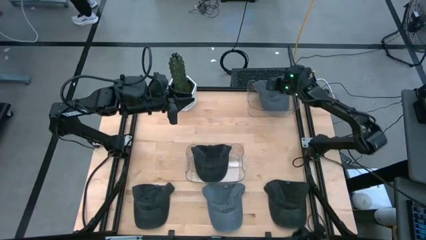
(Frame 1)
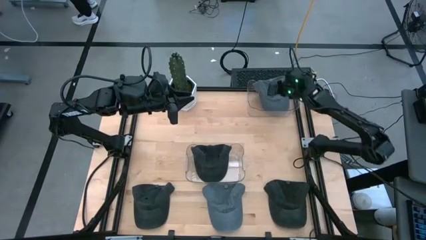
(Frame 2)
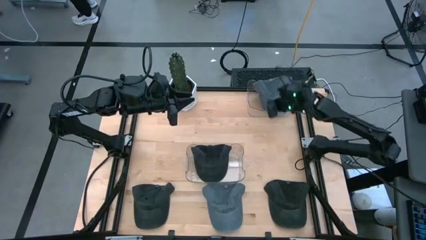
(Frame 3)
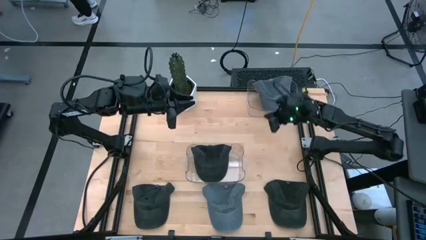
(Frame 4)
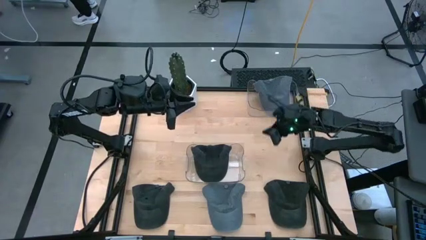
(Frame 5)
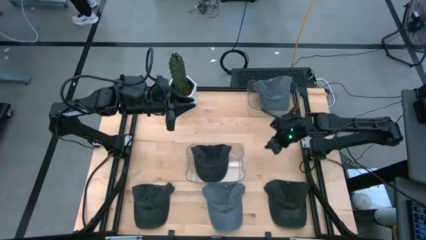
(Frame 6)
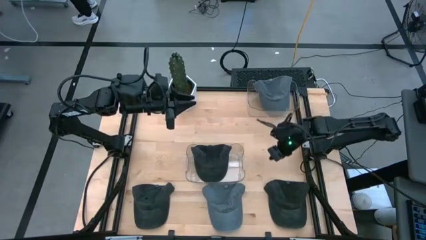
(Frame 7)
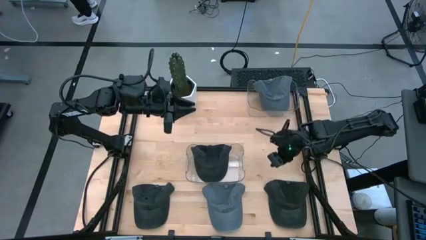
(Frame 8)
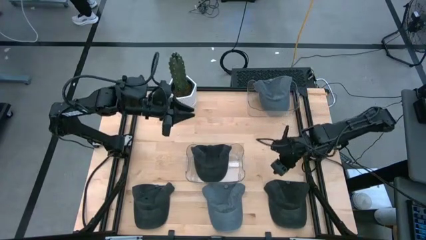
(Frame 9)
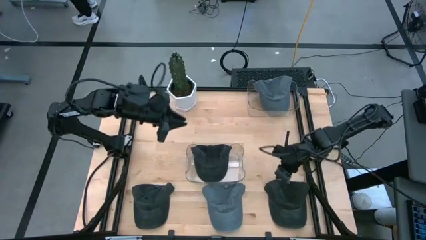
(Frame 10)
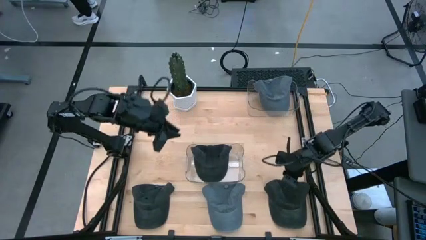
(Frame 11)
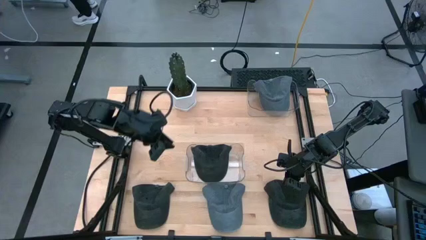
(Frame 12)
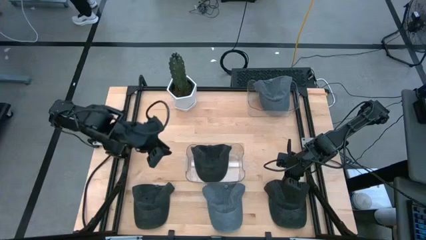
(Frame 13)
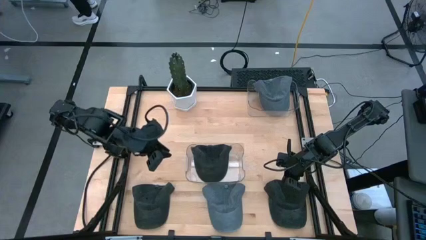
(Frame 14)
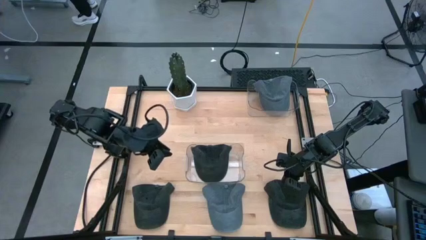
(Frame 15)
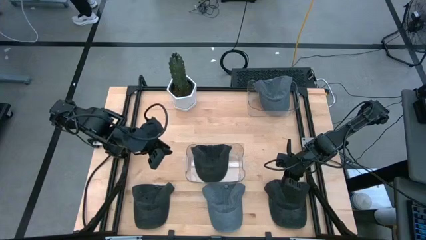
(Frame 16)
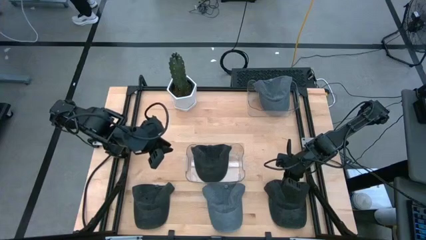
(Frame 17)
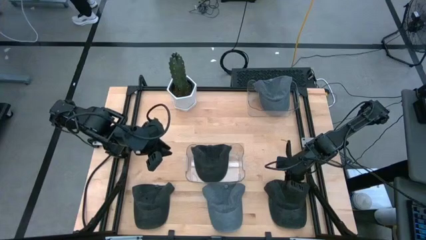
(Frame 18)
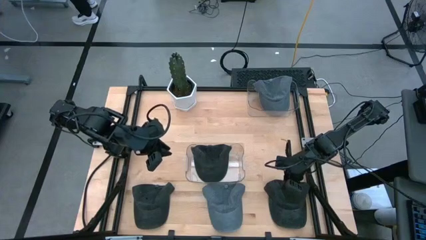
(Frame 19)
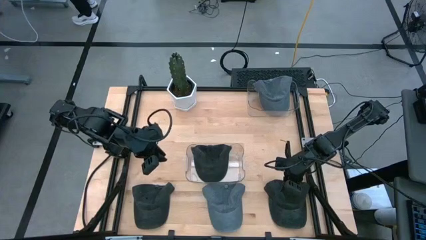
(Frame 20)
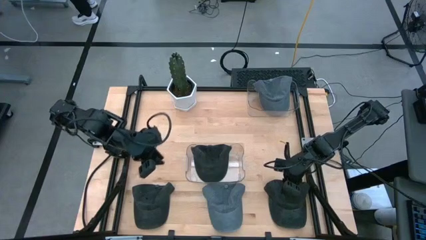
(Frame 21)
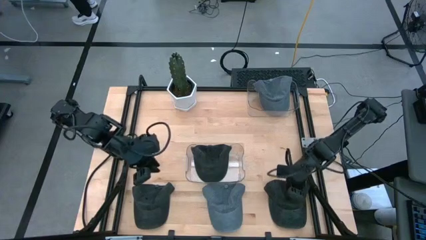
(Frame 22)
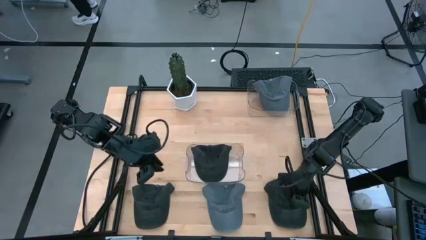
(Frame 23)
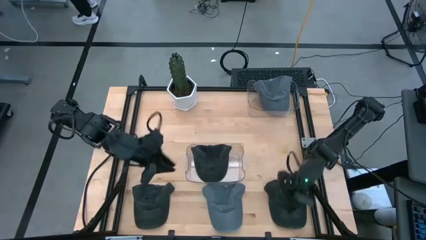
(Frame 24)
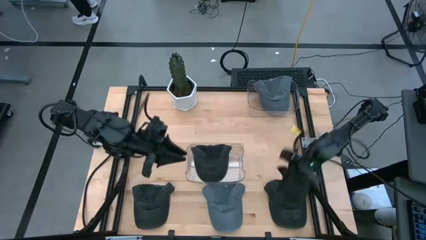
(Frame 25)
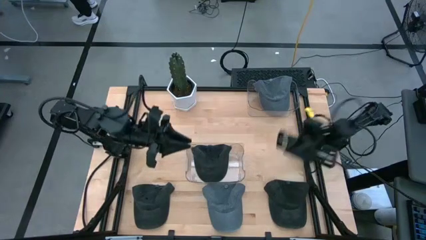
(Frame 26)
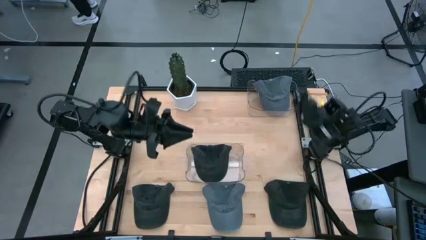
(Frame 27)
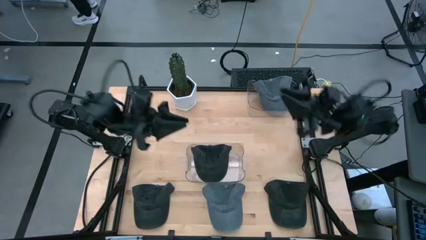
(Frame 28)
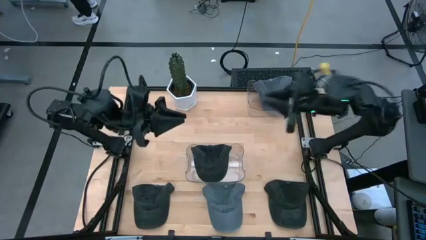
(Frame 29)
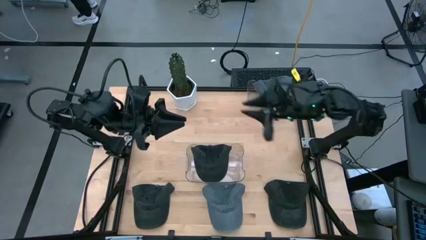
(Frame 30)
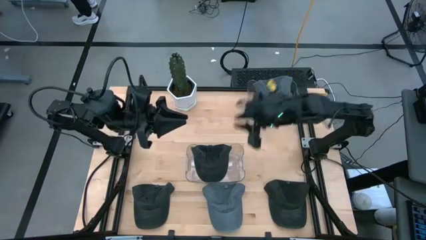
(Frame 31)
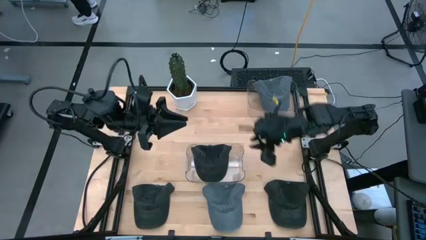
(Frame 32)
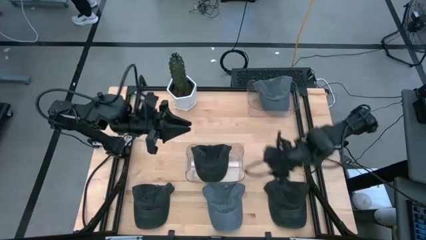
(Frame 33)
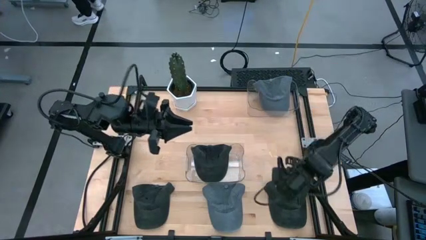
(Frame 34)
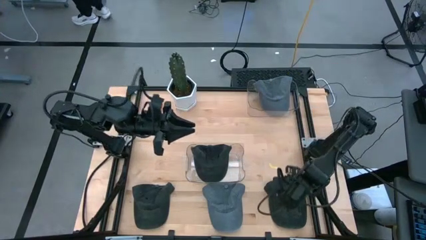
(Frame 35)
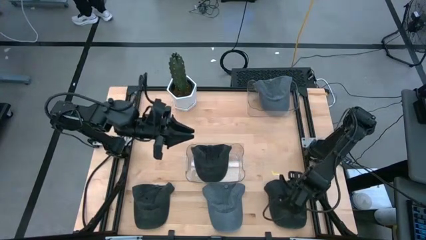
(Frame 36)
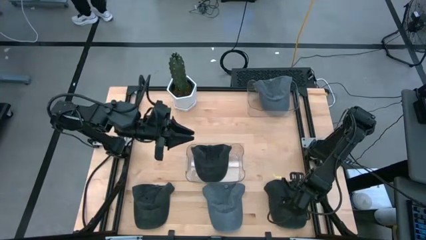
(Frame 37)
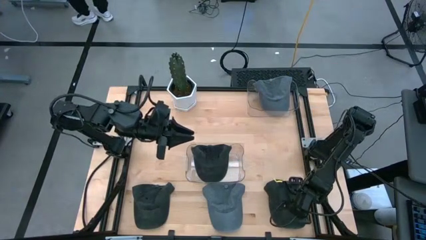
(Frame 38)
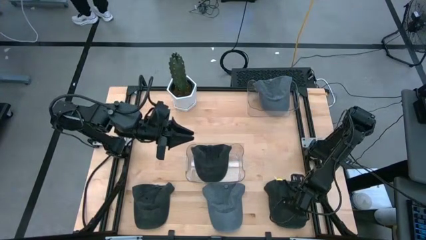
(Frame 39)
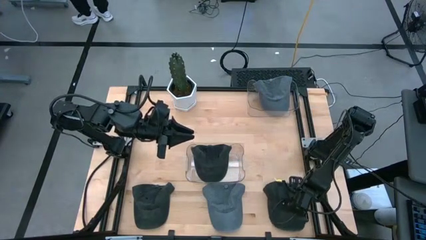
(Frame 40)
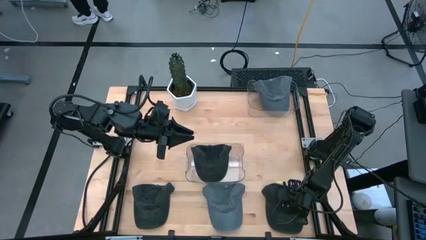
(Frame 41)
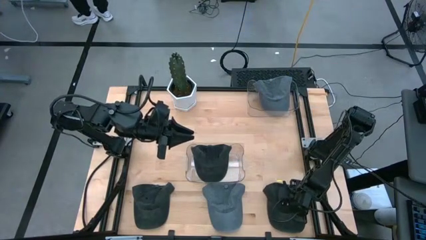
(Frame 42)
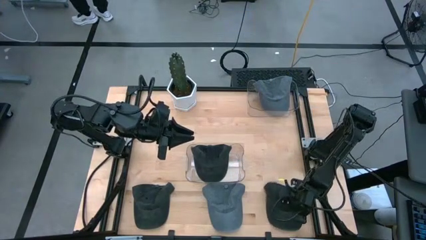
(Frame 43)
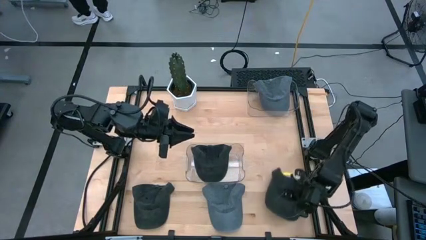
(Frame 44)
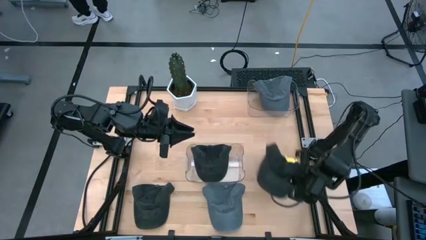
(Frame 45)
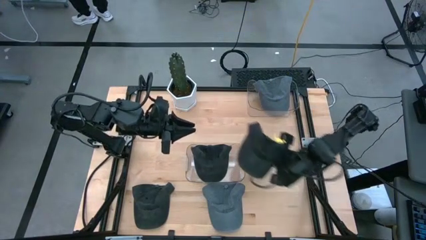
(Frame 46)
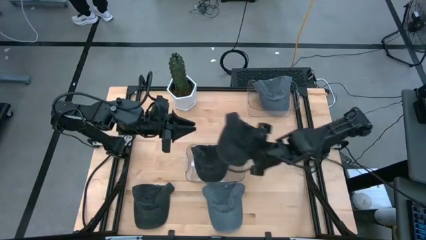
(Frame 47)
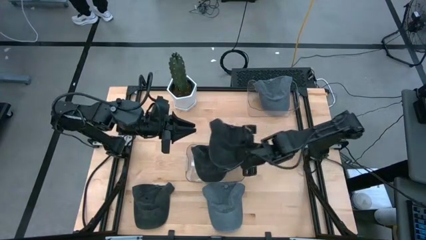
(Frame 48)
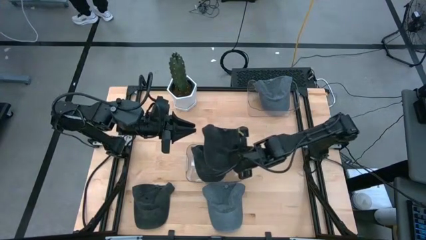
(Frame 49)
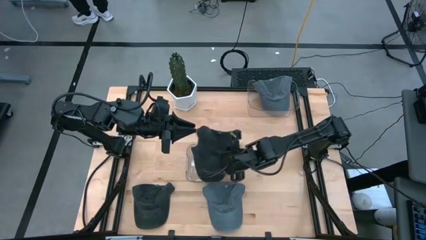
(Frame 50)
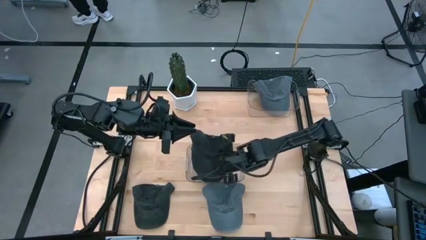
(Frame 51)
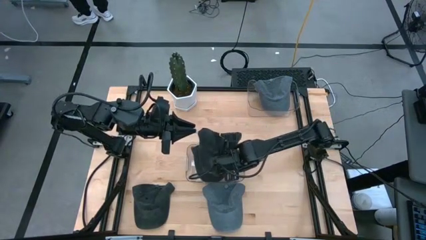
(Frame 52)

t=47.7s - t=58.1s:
Task: Pick & Place hat
Put the right black cap into the bottom transparent bin

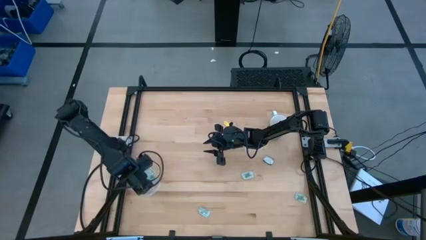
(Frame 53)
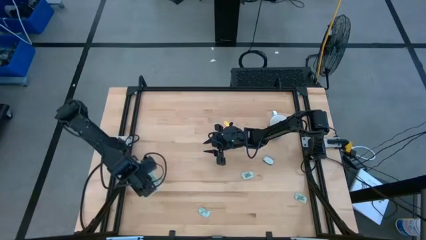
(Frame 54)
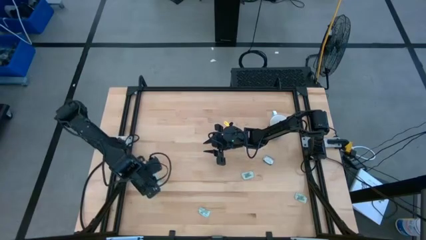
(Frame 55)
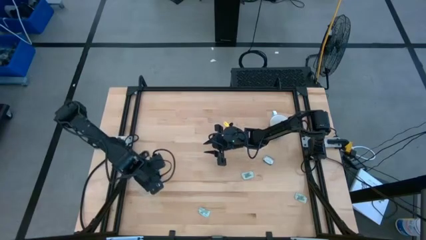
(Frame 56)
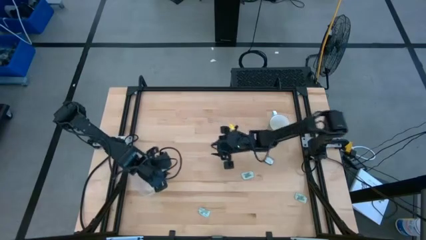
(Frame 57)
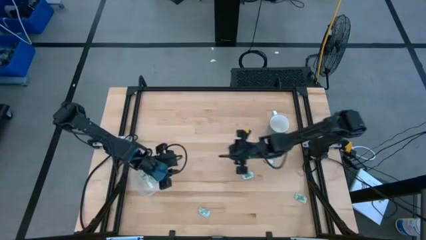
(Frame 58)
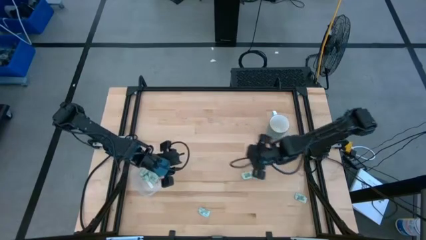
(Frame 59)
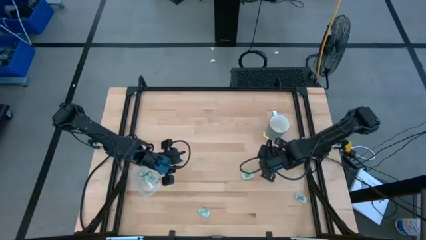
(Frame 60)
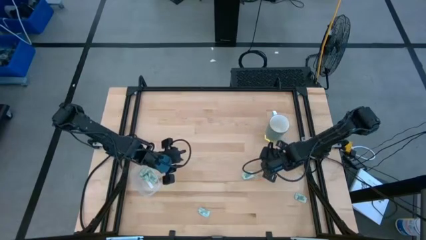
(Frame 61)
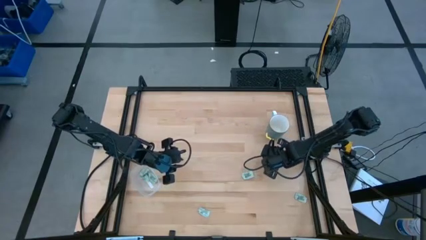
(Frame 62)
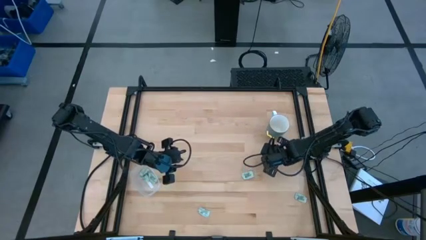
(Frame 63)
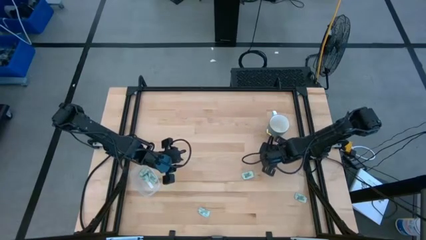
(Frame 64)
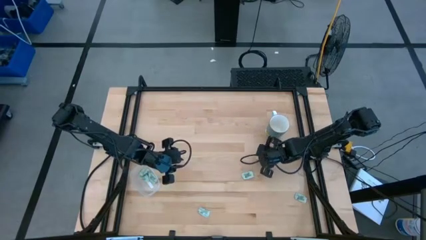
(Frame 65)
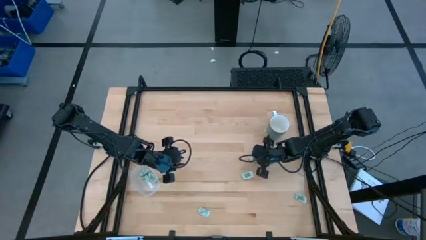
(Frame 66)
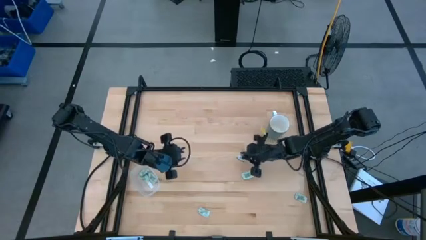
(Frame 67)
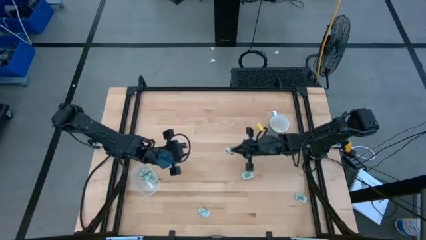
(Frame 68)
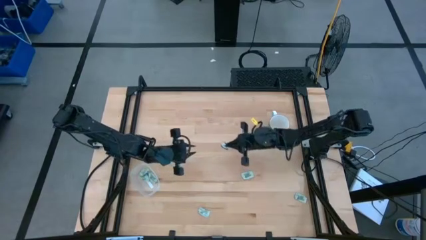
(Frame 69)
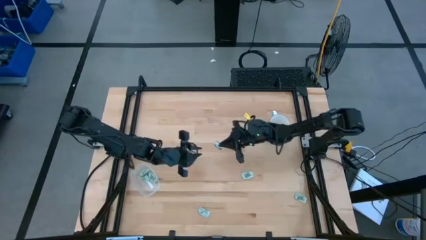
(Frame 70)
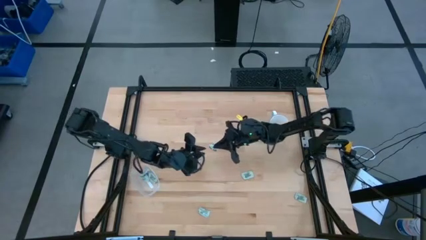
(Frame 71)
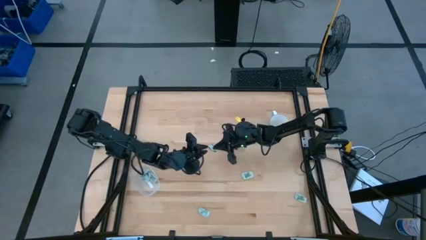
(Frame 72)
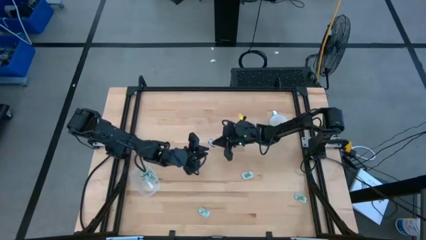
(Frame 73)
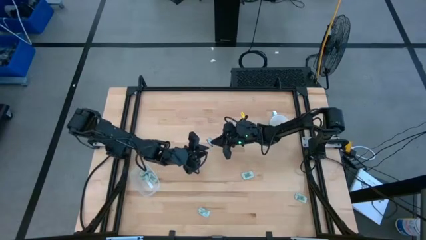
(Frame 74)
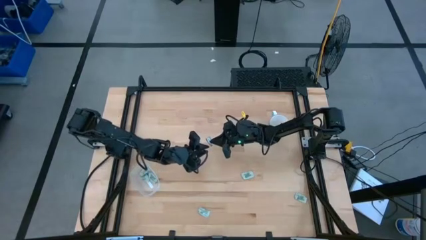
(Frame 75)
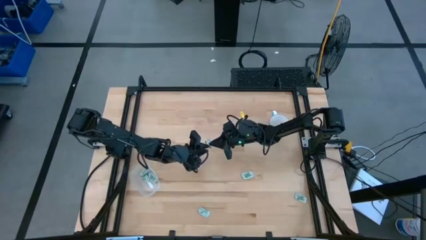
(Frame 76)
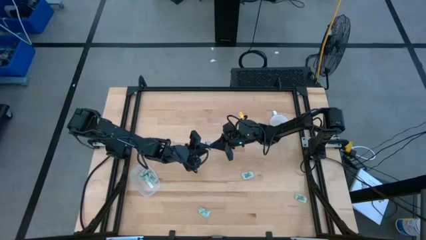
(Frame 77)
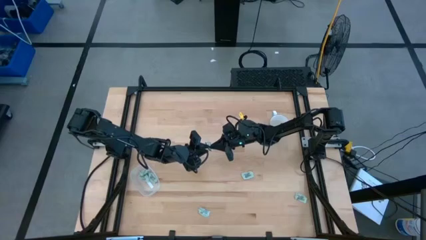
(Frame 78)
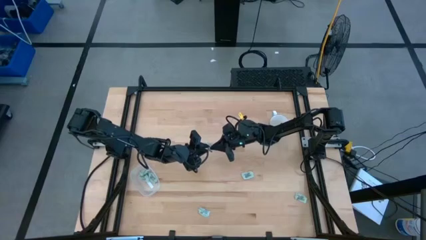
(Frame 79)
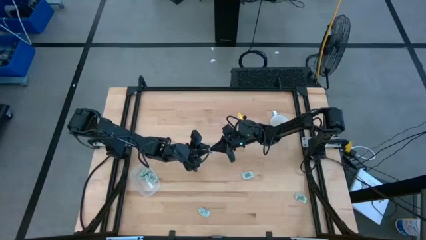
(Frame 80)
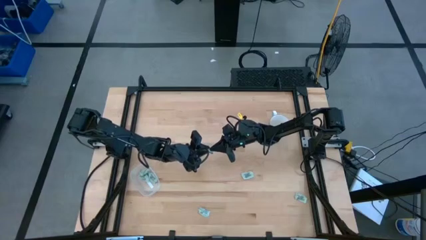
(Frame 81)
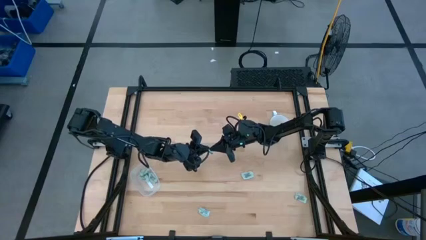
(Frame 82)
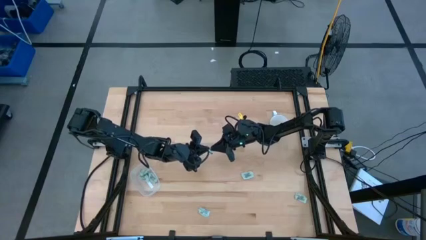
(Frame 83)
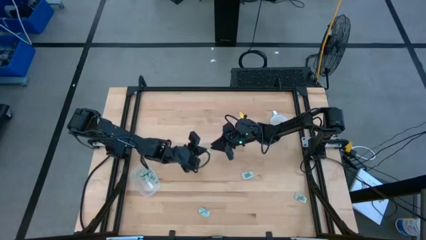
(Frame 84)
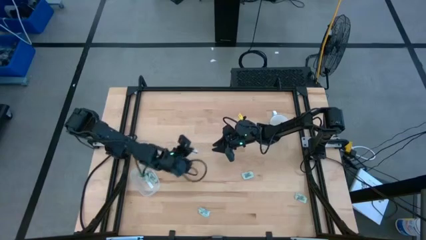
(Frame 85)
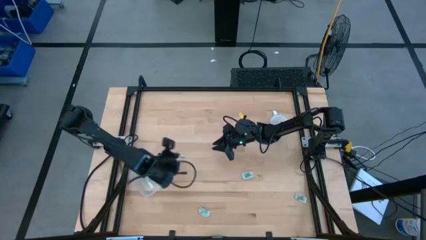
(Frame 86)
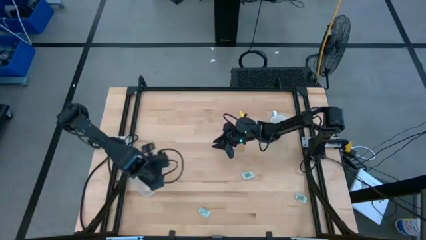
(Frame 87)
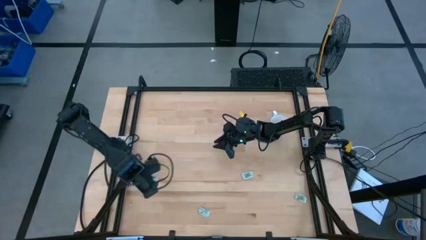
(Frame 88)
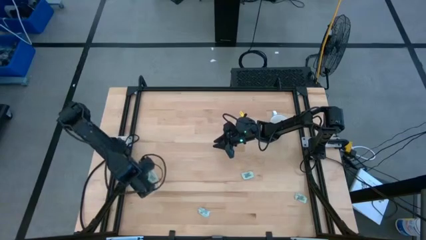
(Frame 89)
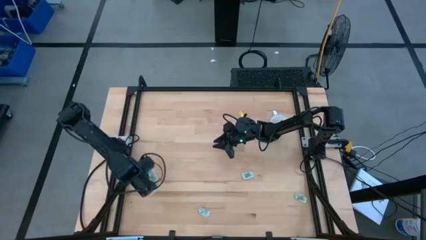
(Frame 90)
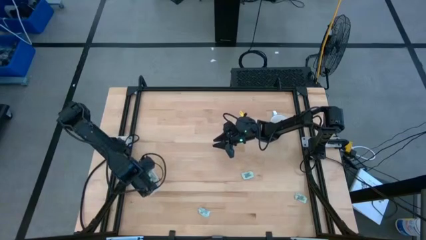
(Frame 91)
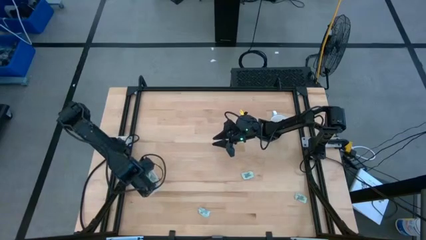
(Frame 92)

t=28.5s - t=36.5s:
Task: Pick and place Stevia / Truvia into bins
Put the stevia packet into the transparent container
